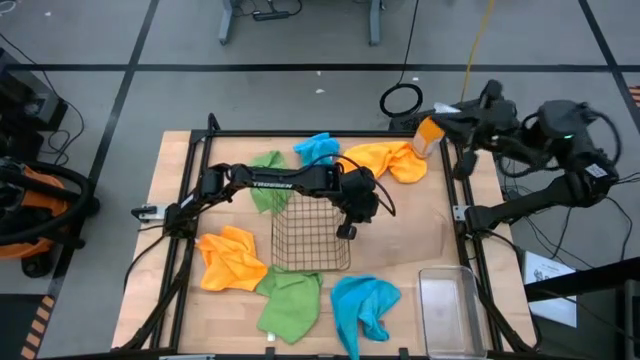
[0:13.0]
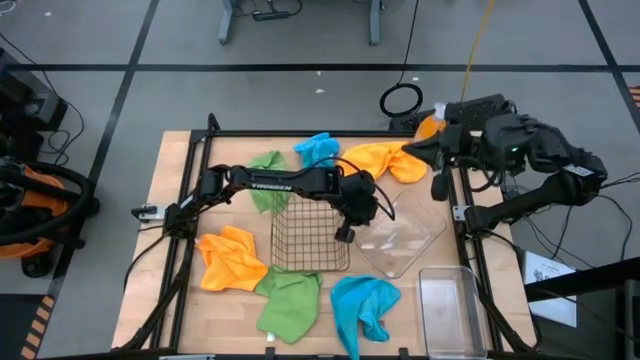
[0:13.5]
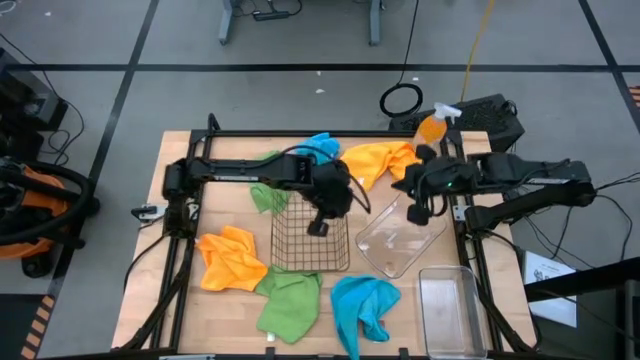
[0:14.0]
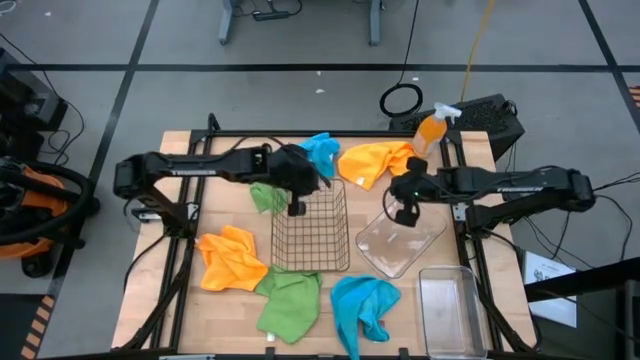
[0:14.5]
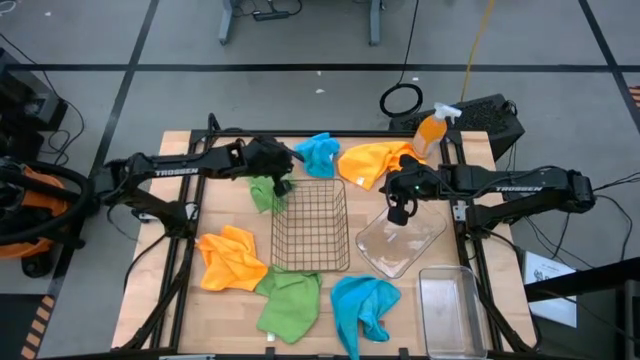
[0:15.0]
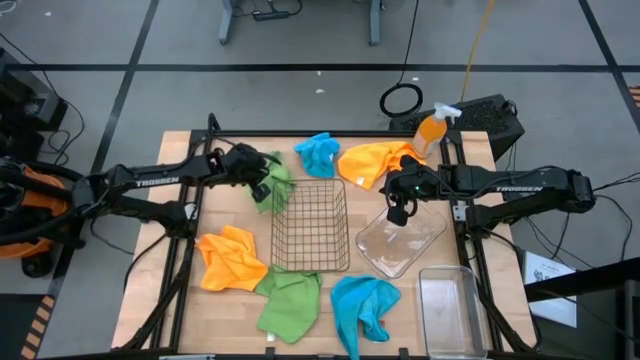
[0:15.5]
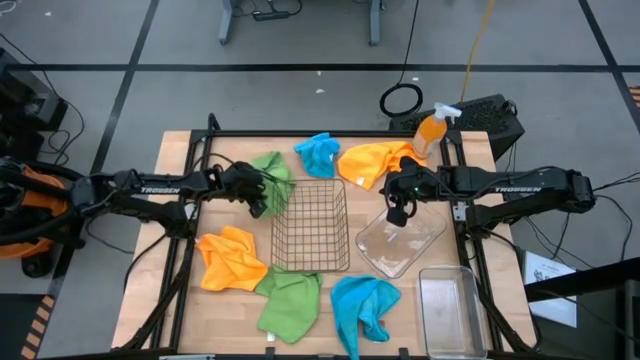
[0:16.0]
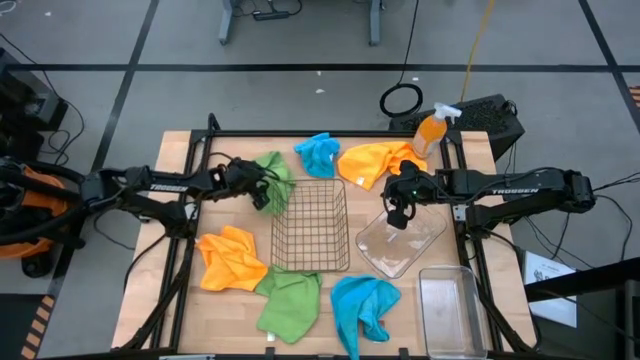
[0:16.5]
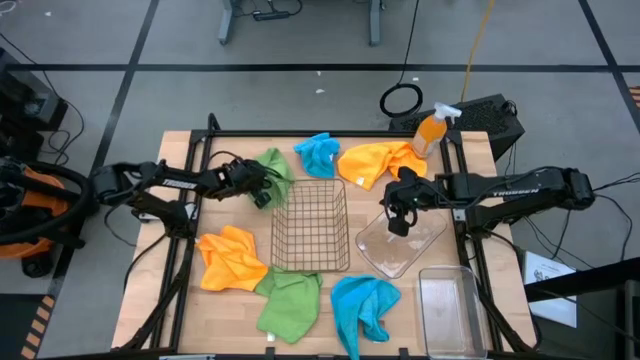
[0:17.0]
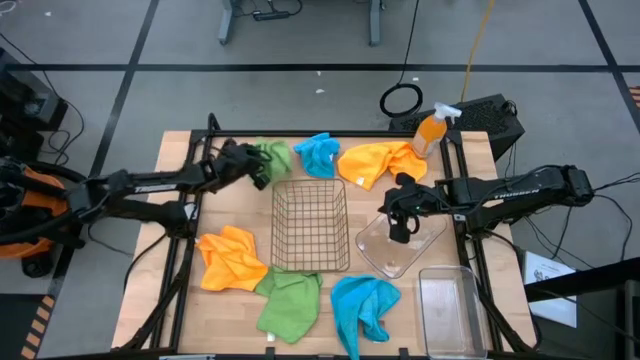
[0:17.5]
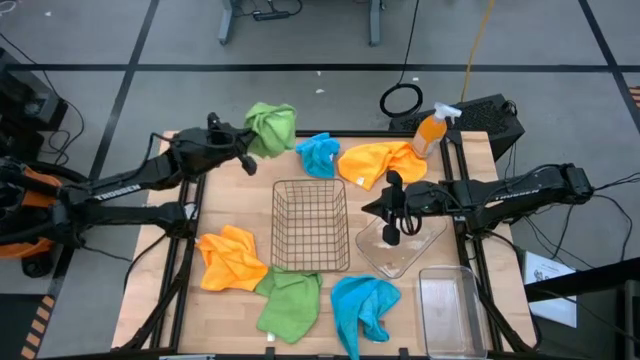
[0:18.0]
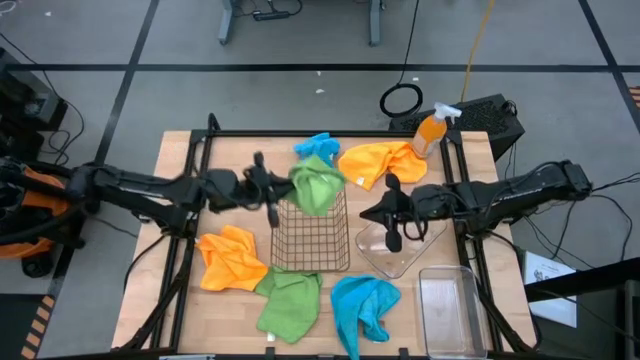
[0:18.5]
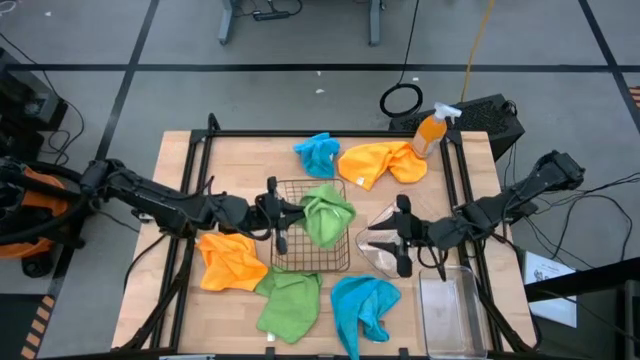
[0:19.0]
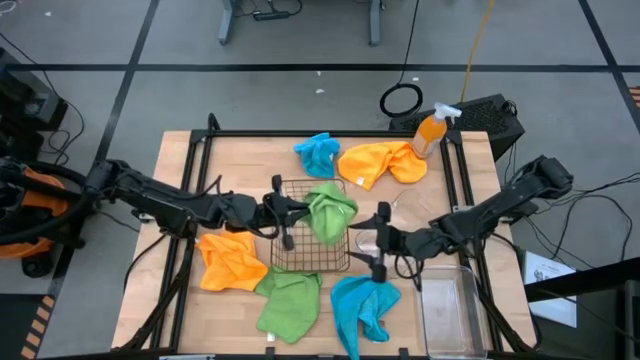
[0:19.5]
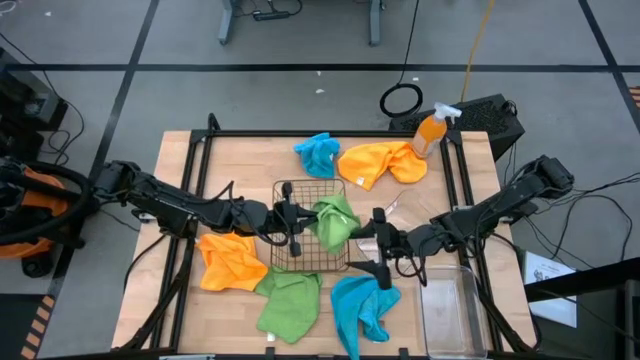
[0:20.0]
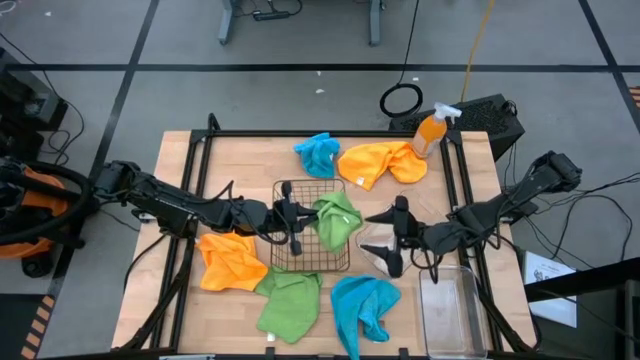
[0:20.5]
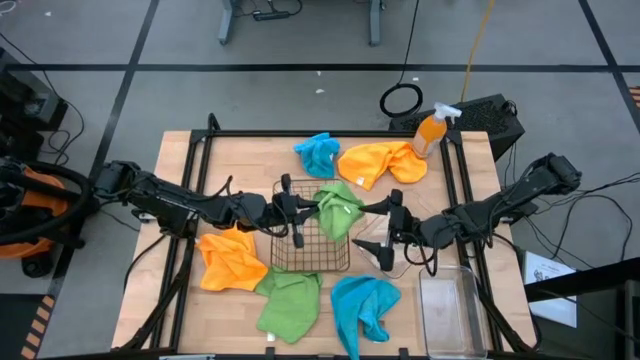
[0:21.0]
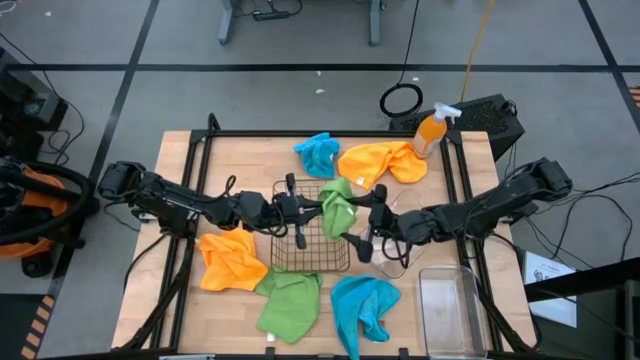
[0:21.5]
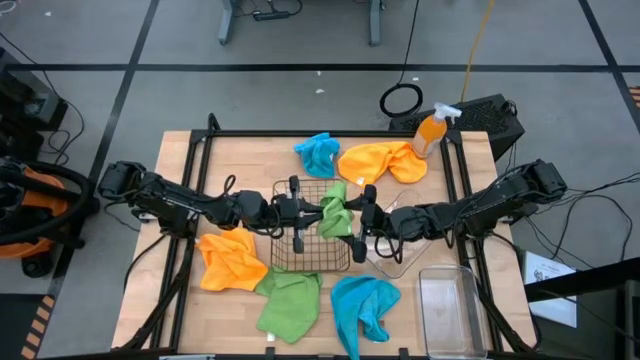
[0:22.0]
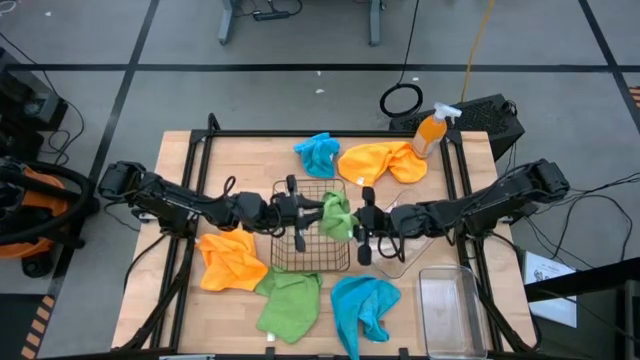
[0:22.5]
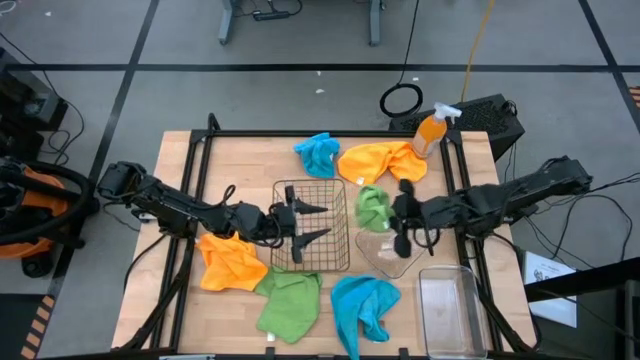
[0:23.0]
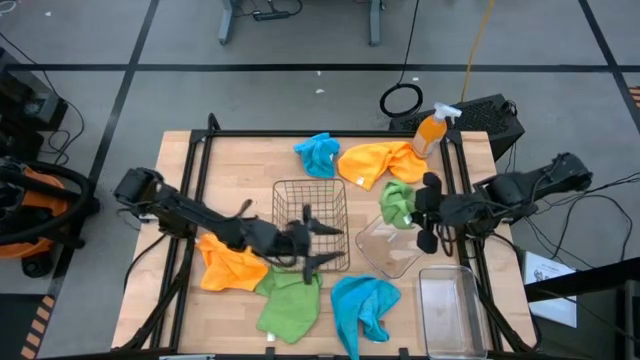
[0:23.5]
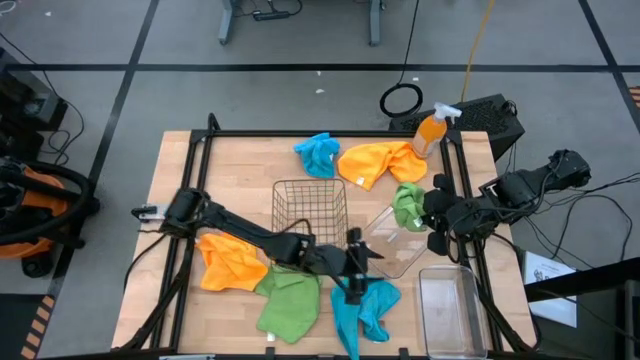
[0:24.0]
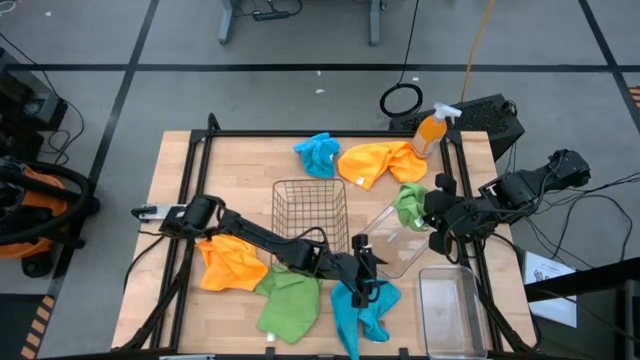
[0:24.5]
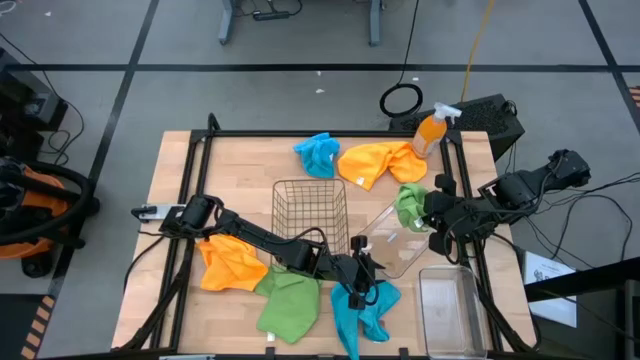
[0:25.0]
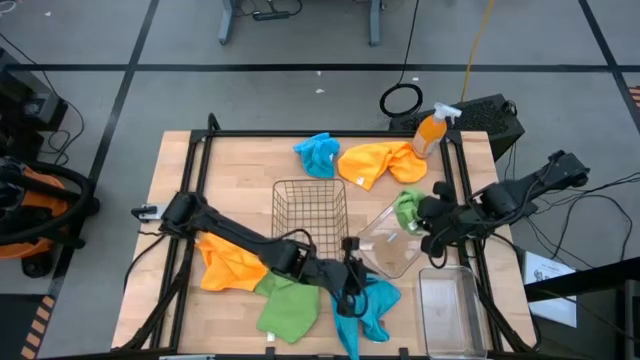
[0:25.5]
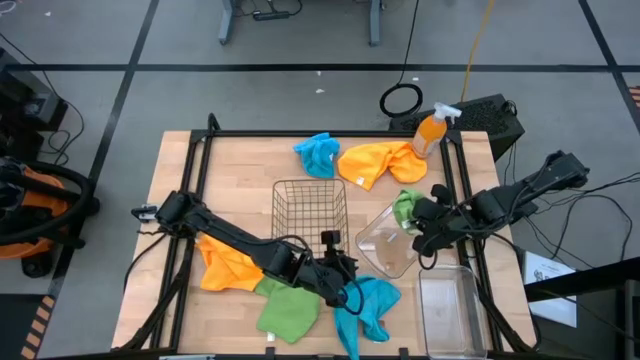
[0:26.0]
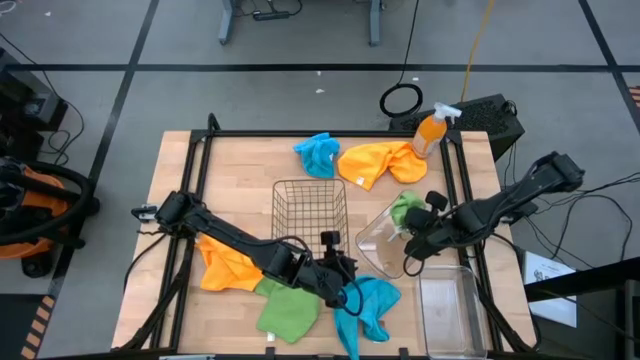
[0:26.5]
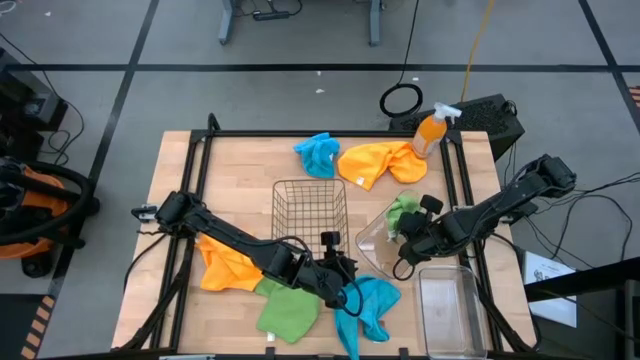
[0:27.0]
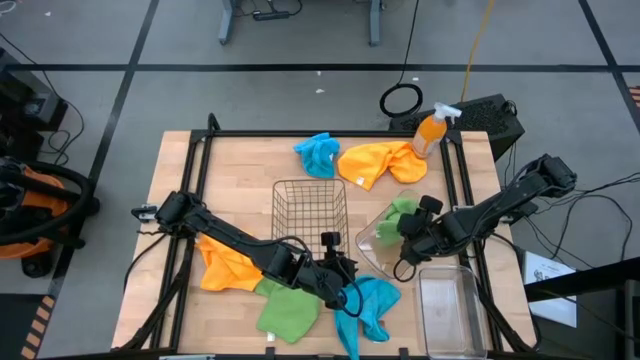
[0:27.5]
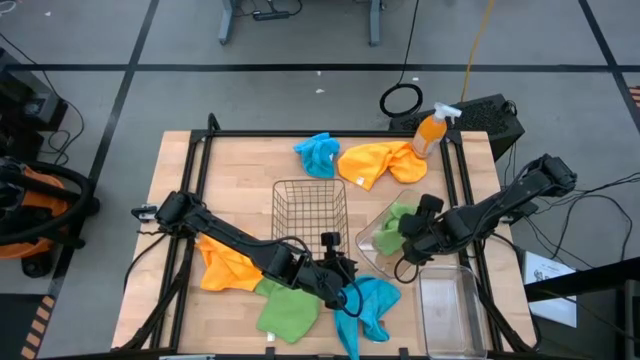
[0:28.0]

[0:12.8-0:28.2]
Task: Sort microfiber towel by color & place in baskets
Put the top green towel into the top transparent bin

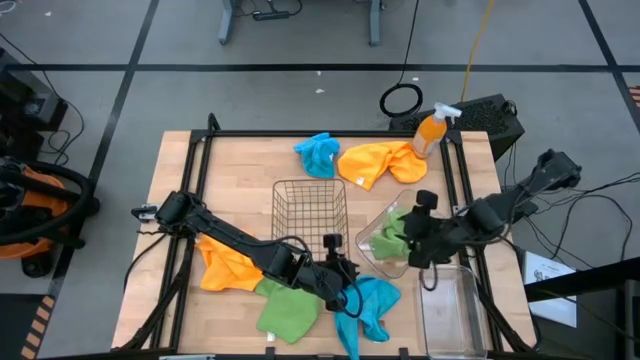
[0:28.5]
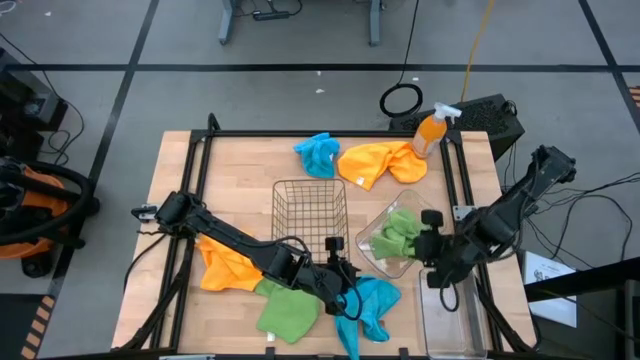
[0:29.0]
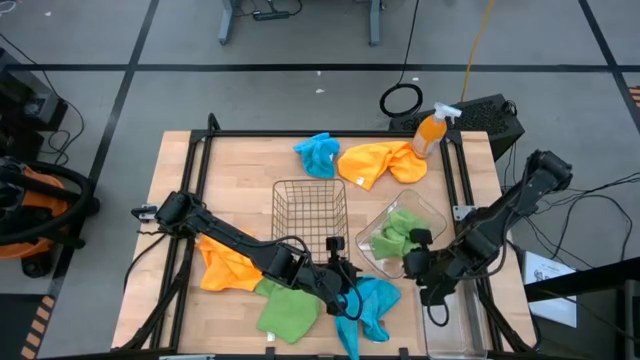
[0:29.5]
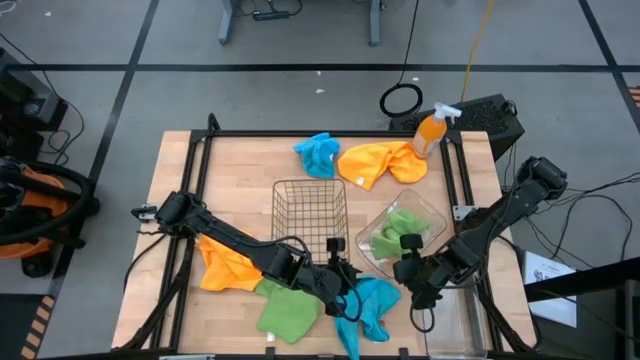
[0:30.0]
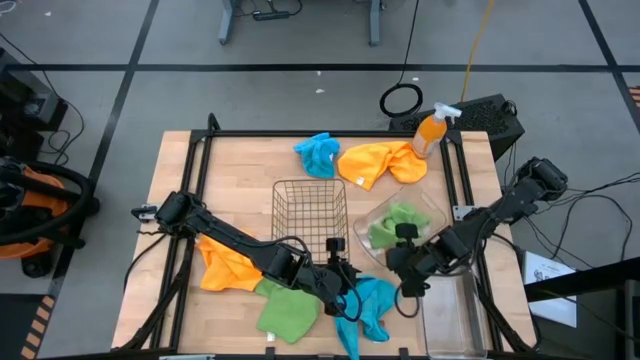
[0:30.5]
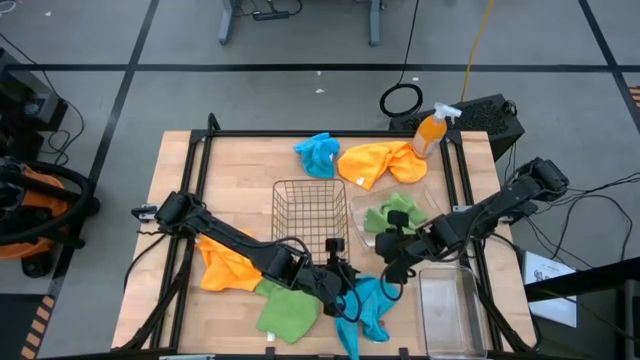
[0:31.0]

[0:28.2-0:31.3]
Adjust the top transparent bin

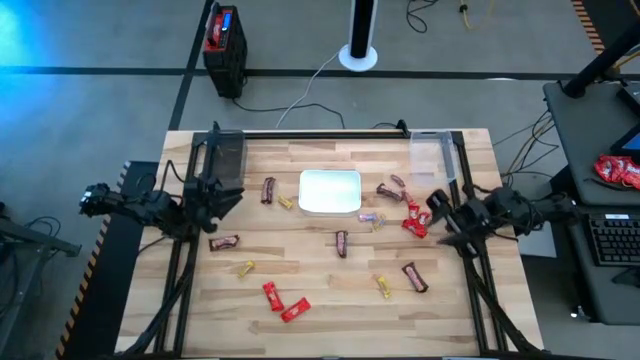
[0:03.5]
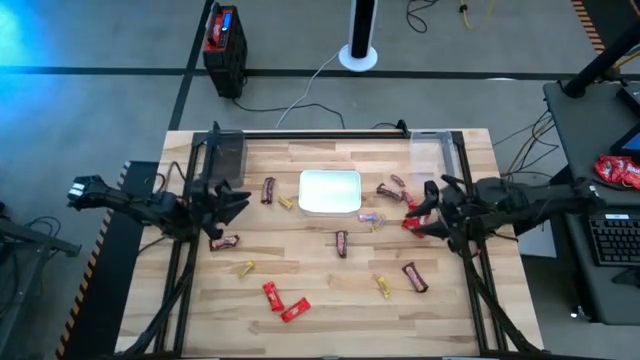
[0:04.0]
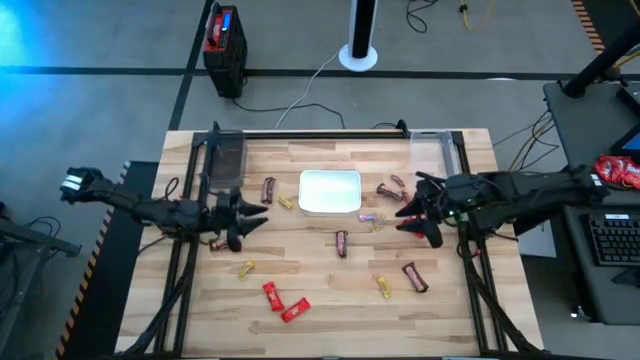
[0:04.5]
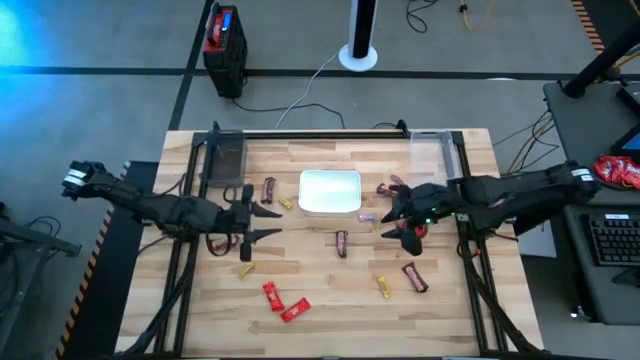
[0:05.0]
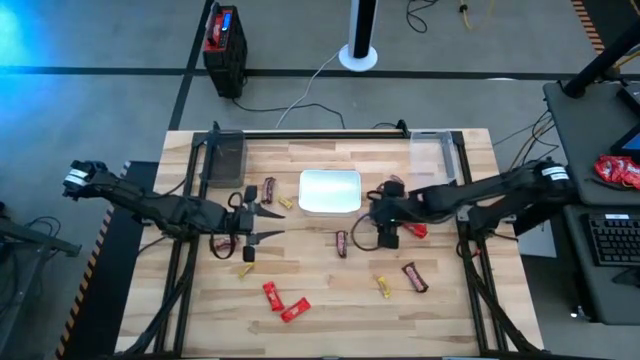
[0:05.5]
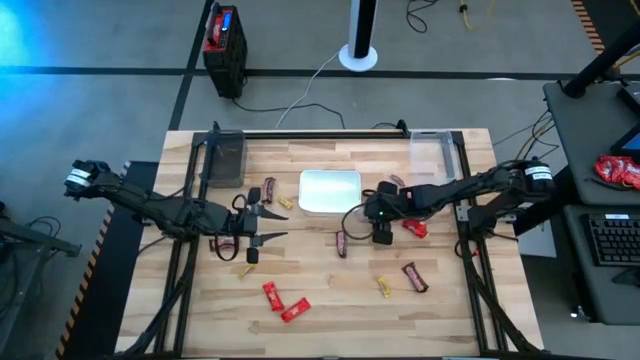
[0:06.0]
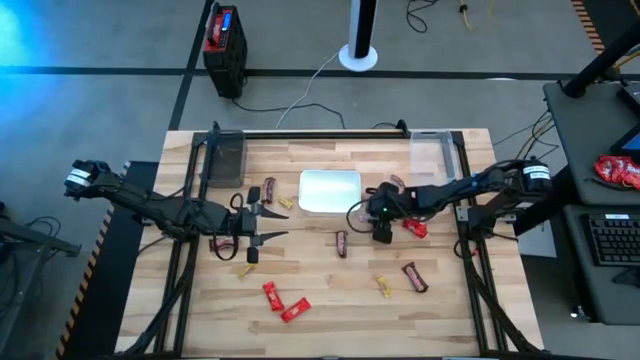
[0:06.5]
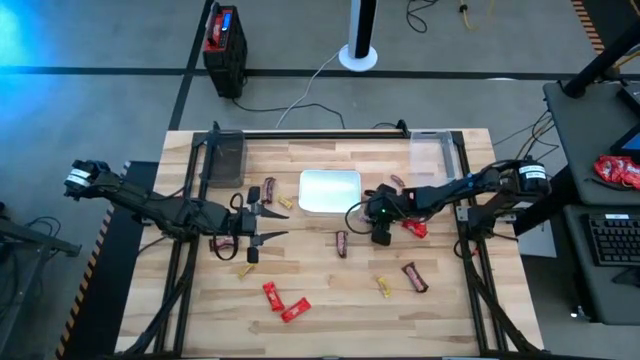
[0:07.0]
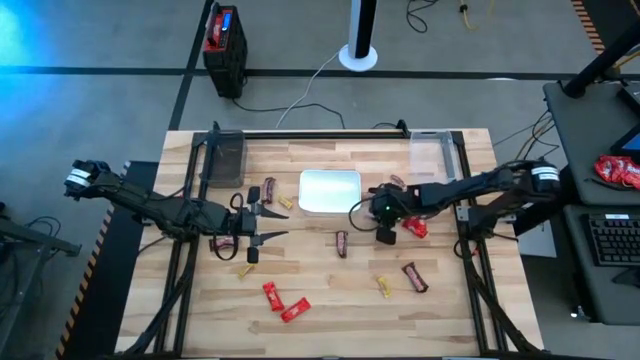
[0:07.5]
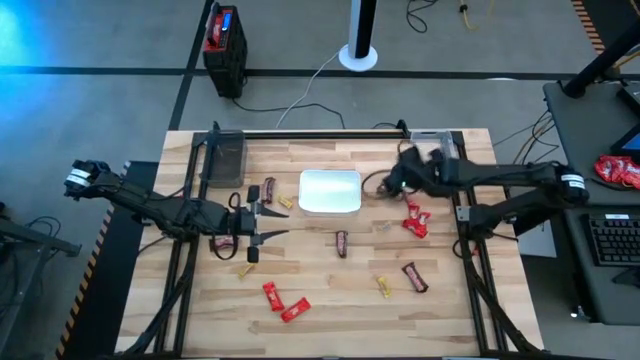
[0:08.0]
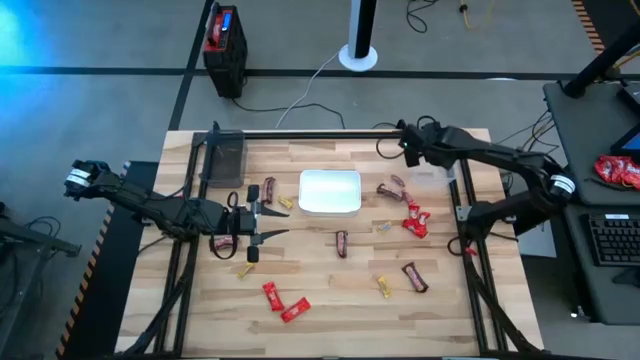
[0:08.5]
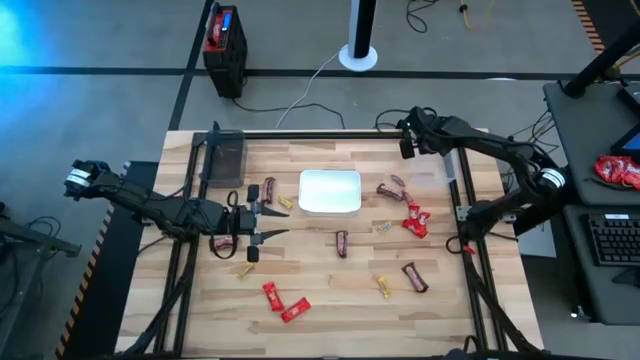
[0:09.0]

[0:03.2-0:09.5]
Task: Sort candy by brand, put in halloween buckets
Put the pink candy into the transparent bin
